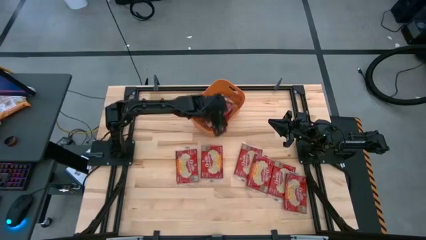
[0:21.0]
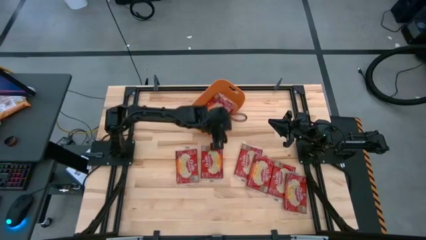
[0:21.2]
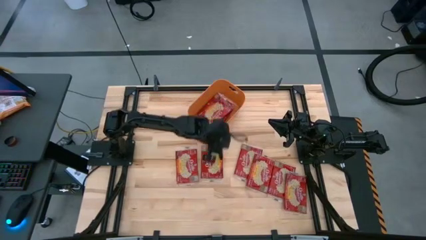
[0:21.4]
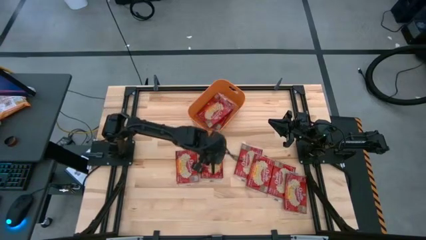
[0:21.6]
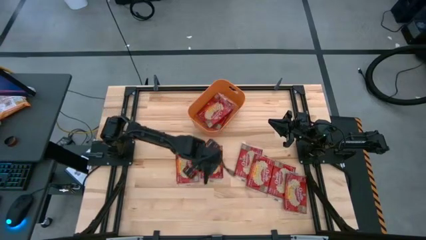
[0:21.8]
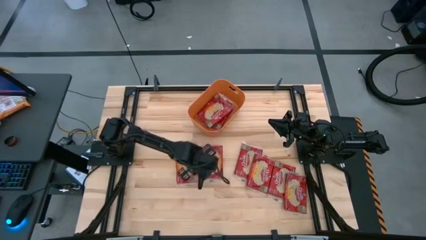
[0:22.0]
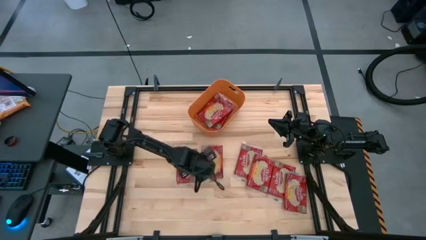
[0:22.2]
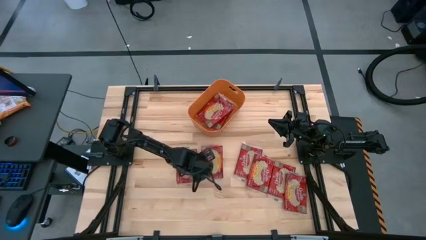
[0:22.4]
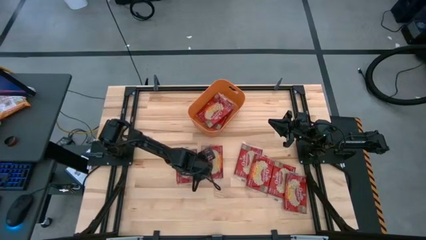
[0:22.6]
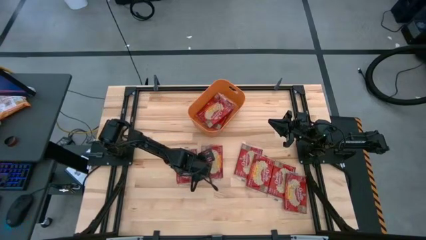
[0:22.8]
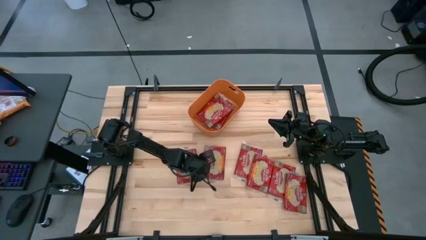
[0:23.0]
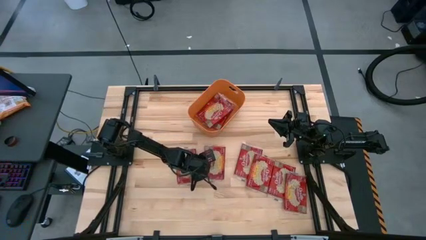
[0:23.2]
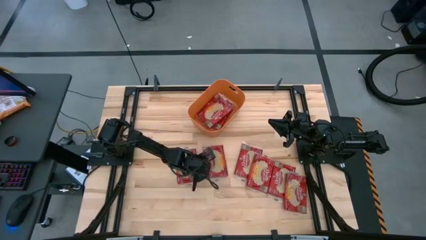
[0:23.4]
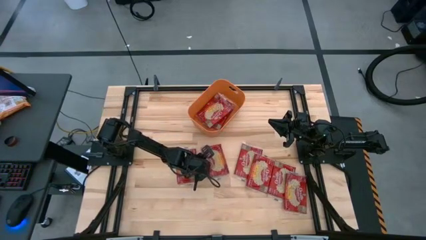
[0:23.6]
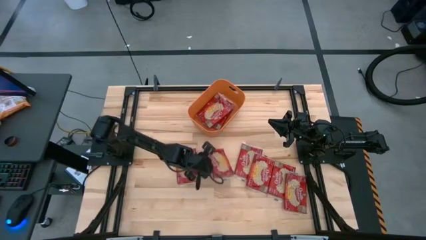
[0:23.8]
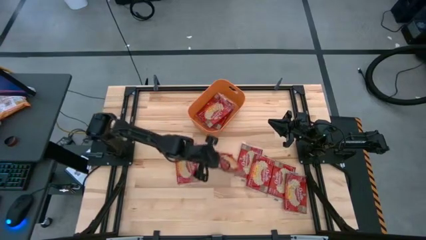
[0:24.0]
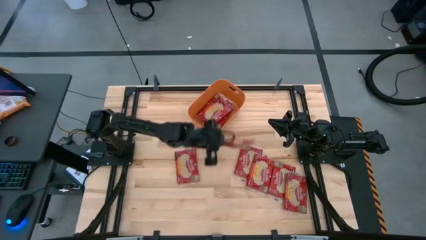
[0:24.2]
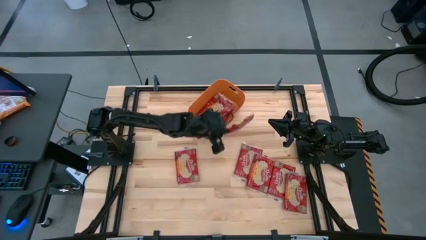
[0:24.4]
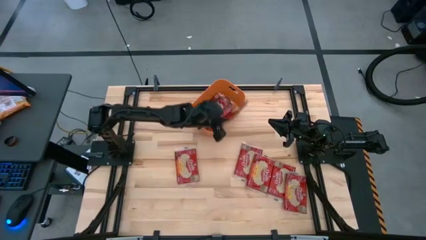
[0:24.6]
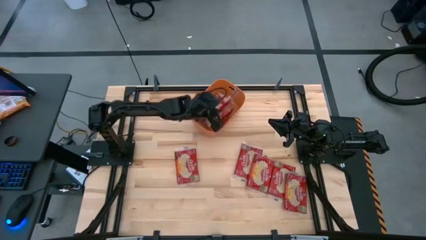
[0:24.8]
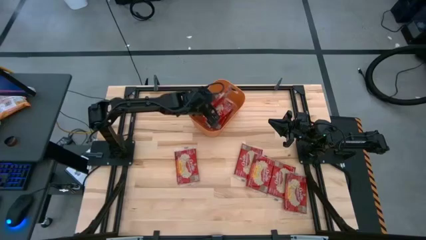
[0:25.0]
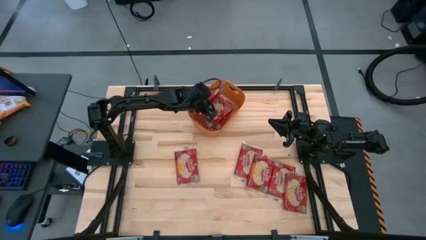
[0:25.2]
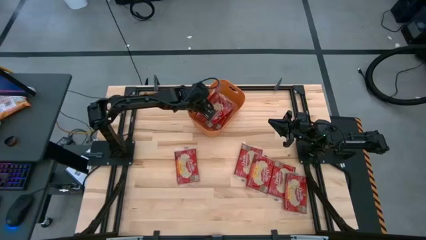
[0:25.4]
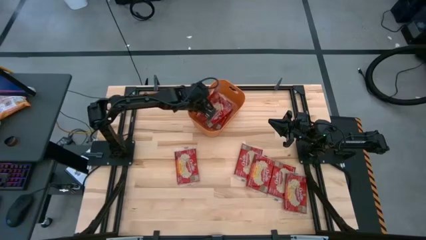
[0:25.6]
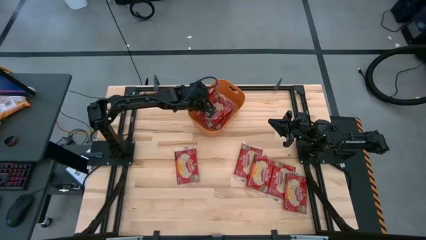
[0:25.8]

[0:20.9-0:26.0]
Task: Sort popcorn bags into baskets
Put the red popcorn bag into the orange bin

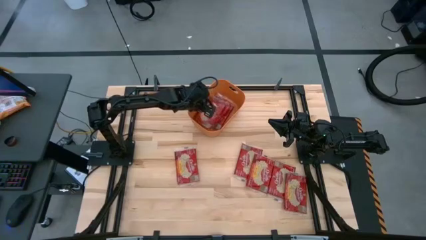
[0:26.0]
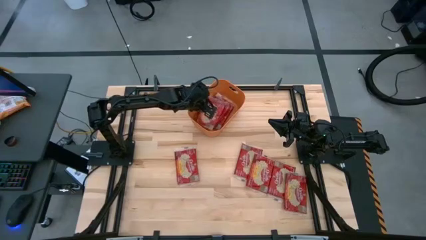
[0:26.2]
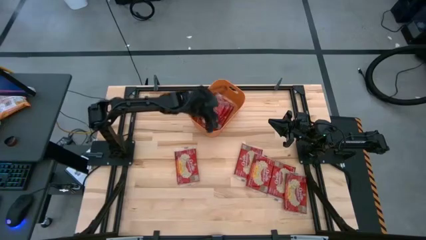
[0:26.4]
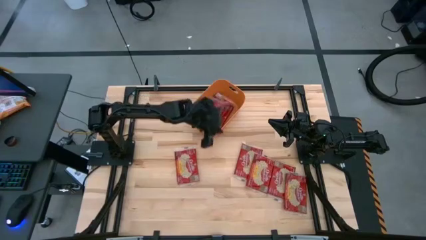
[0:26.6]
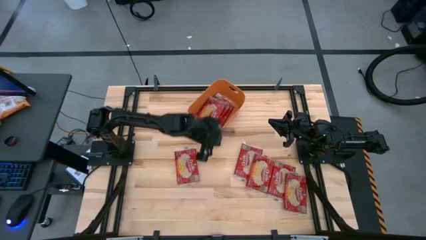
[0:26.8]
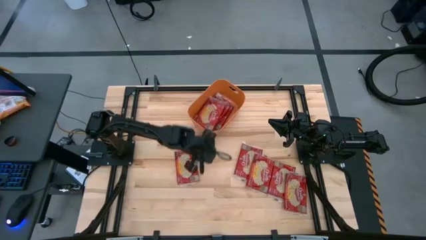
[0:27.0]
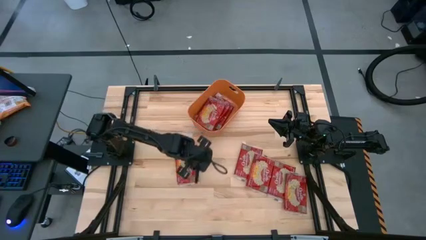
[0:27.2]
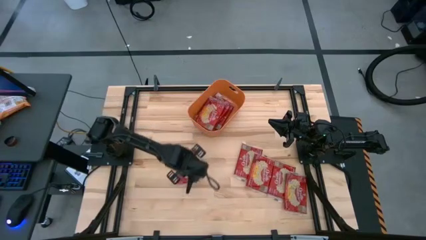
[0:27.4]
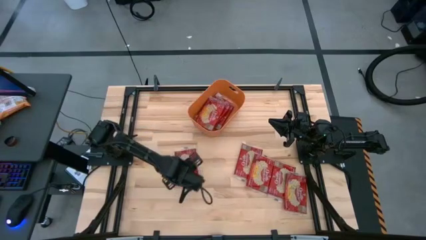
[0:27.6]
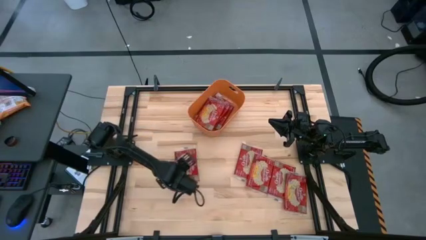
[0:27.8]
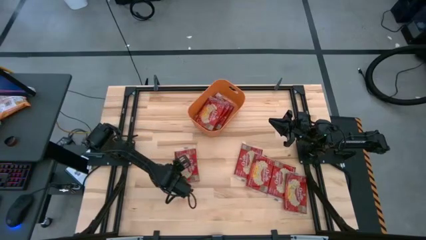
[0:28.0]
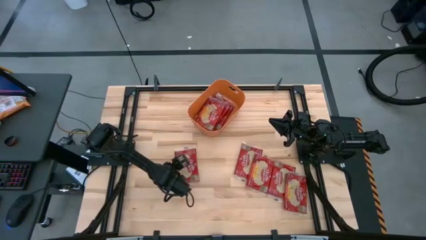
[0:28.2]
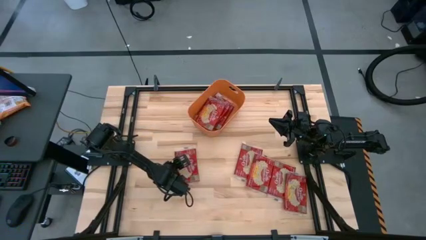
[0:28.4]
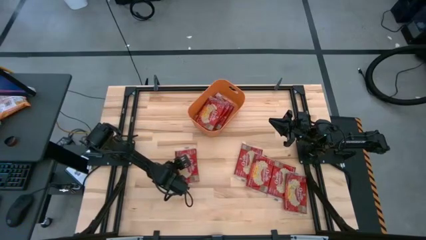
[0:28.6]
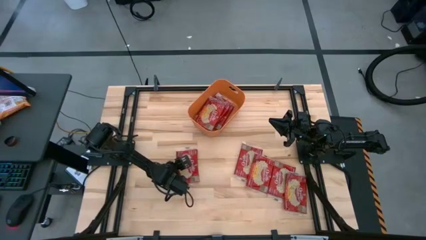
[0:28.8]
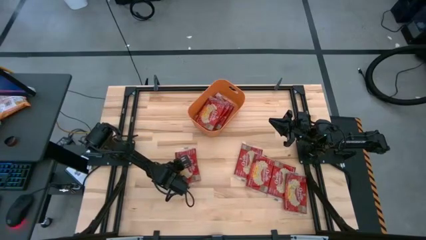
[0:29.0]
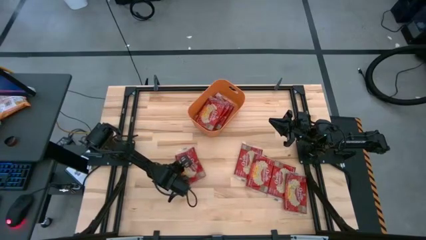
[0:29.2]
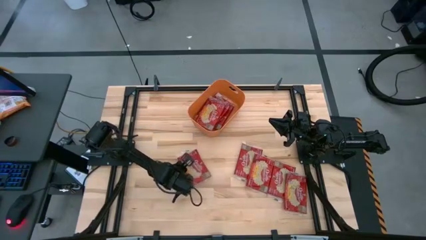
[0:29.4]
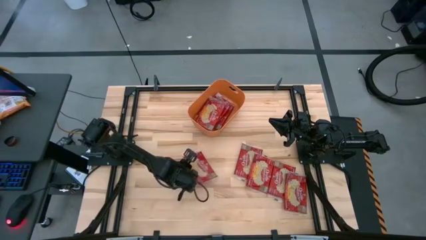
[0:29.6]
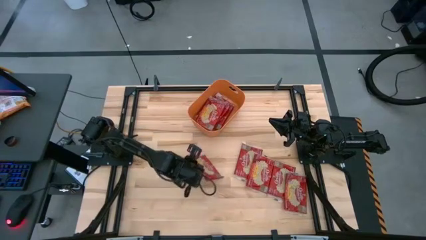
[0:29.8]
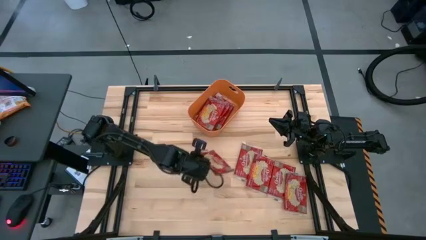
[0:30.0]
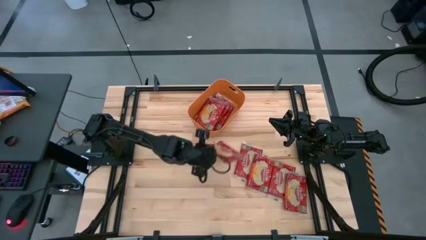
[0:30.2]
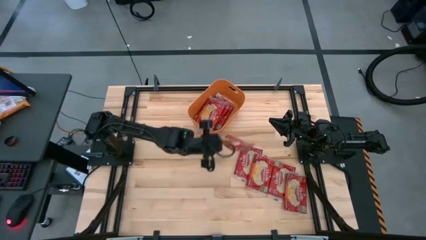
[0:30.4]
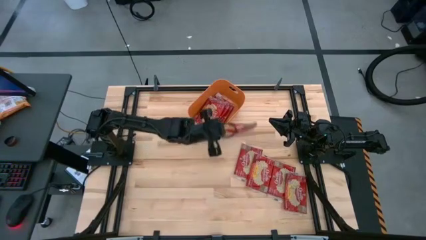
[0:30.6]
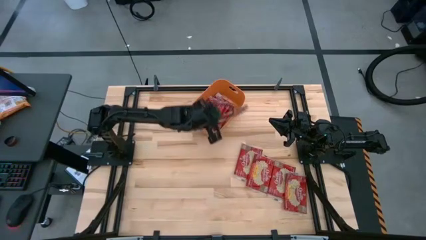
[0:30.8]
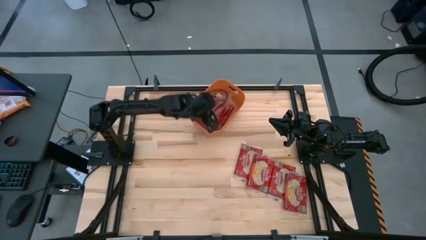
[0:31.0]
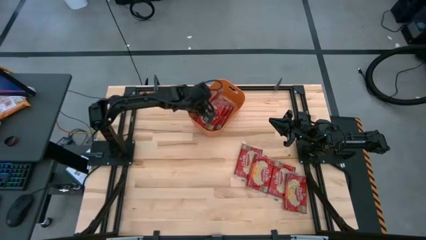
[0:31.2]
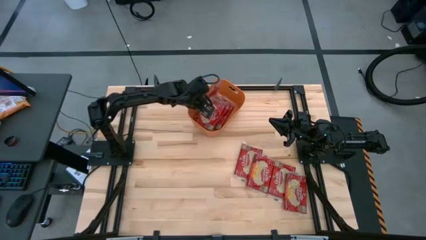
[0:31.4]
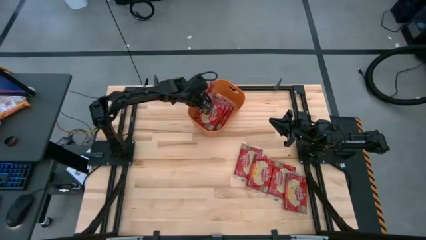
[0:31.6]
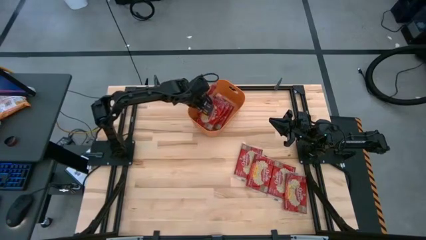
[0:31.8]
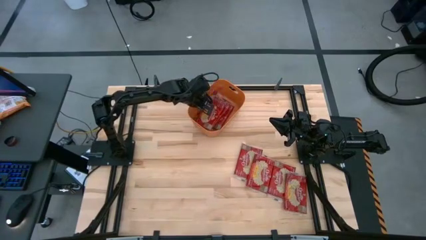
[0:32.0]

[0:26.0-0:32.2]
Put the red popcorn bag into the orange bin

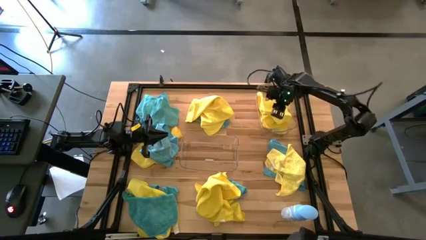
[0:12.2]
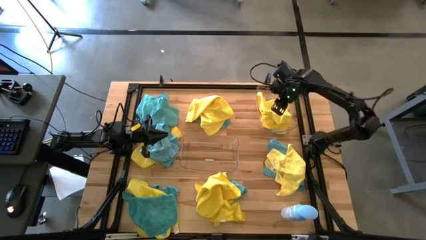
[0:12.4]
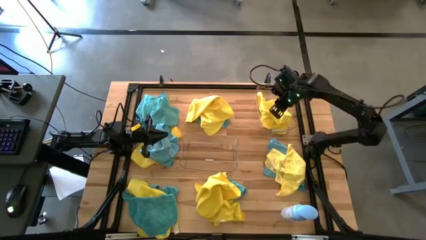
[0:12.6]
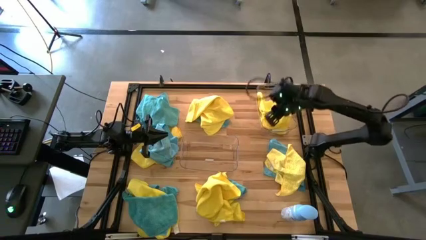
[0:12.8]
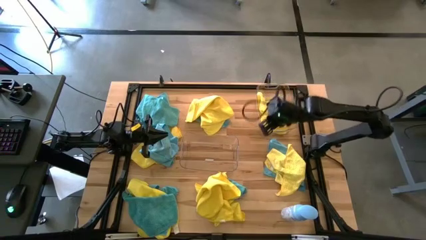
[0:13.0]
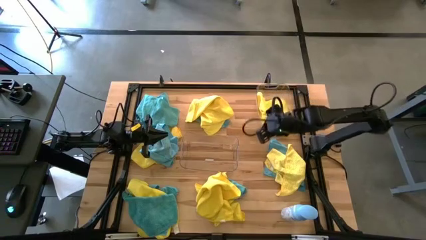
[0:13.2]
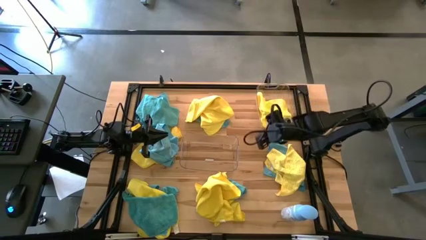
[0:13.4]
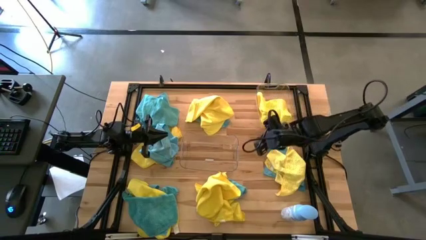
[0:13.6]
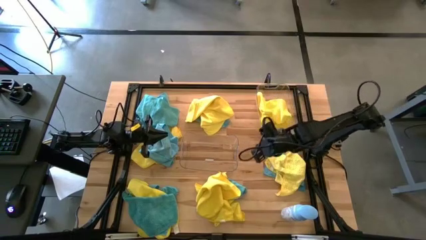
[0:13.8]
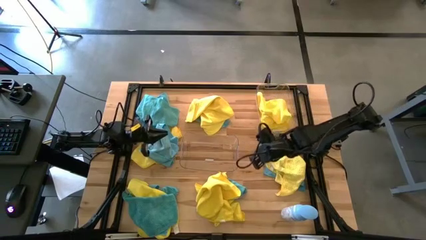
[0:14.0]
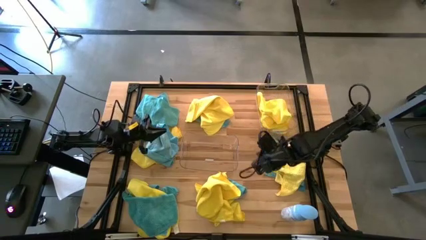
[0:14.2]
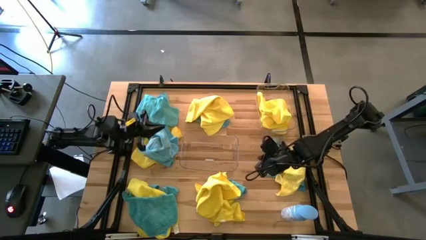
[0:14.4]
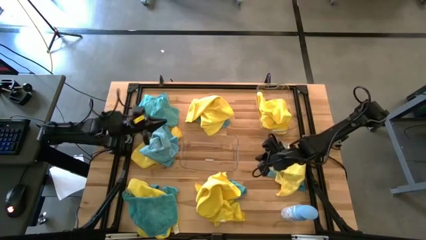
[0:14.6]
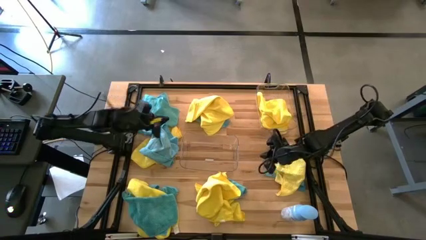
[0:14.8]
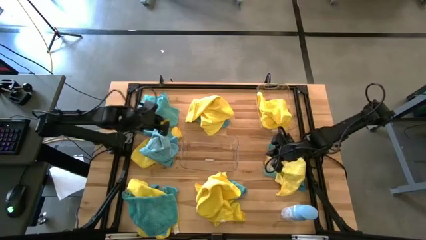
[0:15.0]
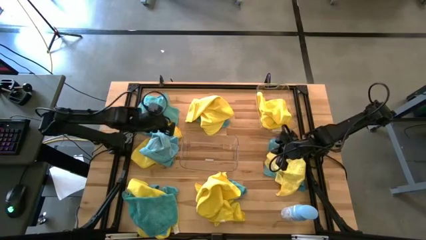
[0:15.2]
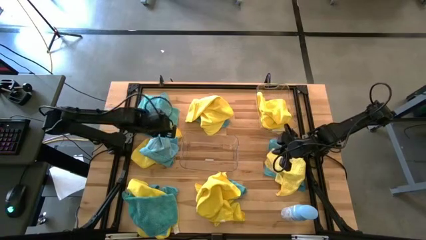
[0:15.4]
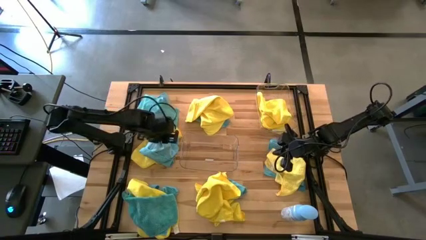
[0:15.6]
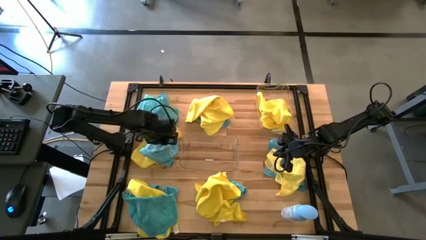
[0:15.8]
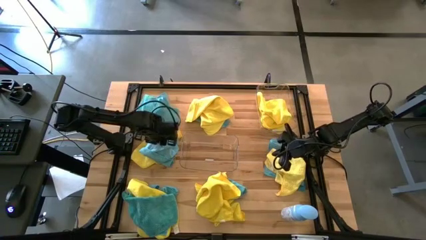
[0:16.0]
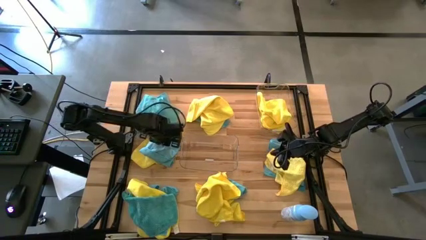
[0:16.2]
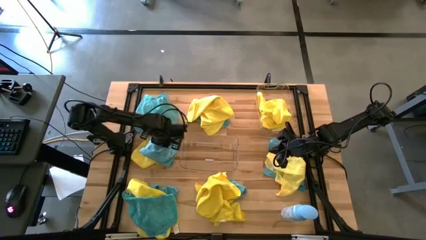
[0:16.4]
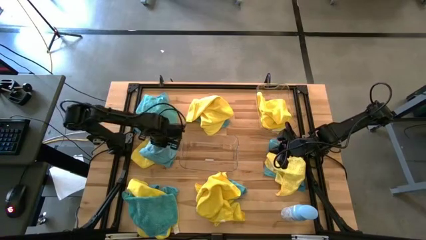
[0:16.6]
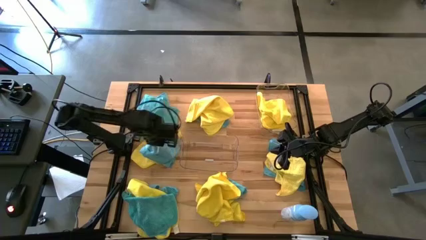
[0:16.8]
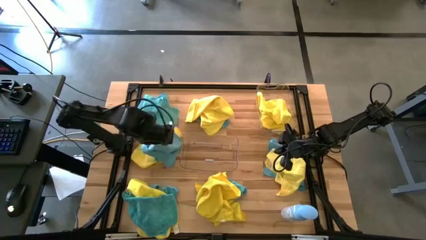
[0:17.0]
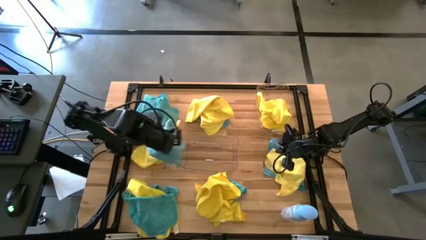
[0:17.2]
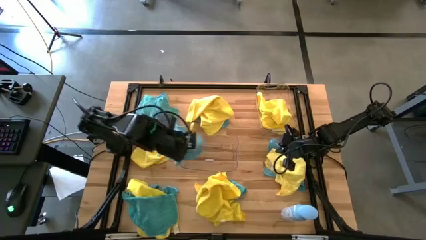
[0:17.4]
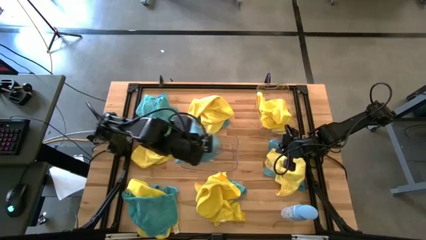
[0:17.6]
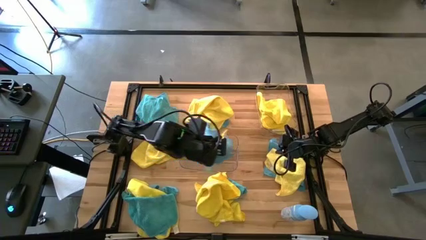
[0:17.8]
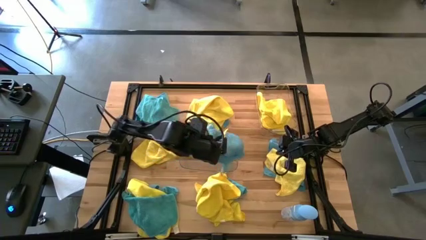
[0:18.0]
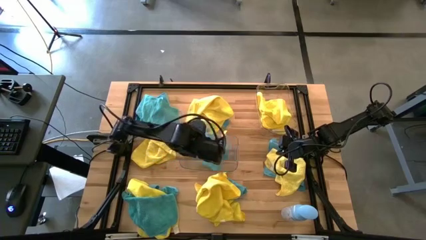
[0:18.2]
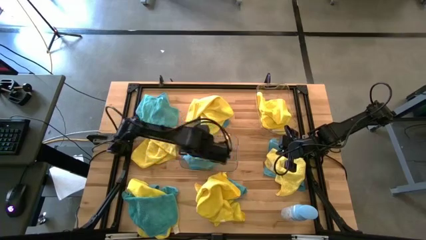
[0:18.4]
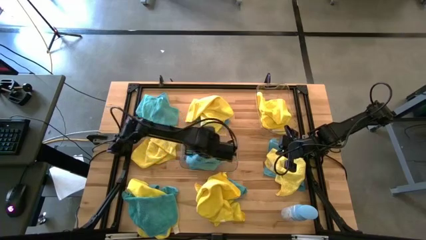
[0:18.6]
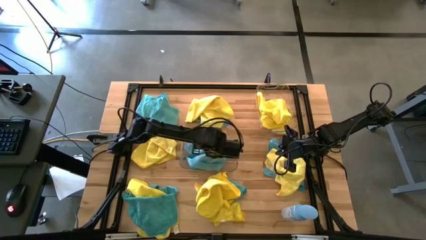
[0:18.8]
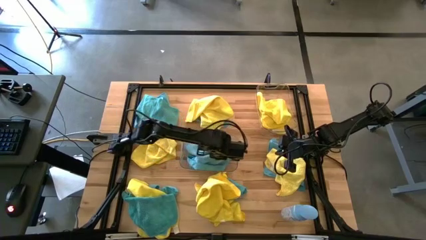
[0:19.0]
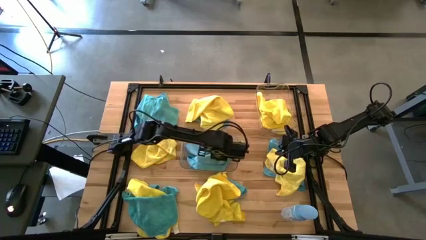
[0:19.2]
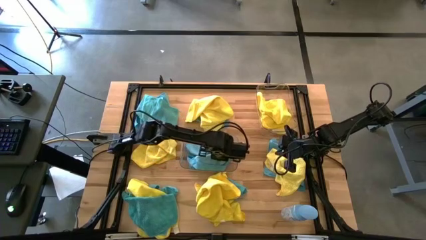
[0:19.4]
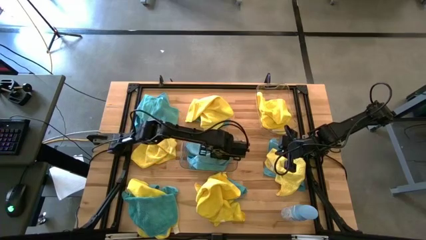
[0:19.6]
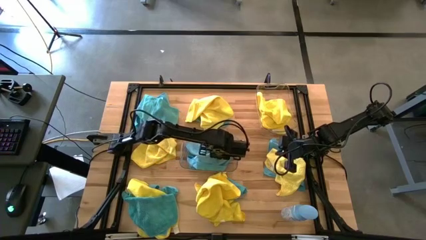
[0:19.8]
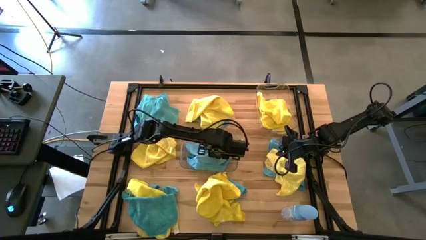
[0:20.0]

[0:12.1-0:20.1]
Task: Sort microfiber towel by color & place in baskets
Put the blue towel into the bottom transparent bin
